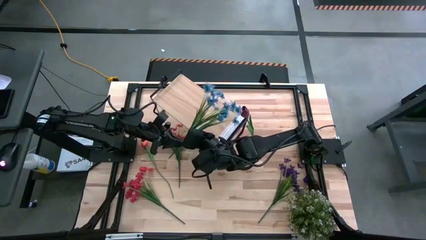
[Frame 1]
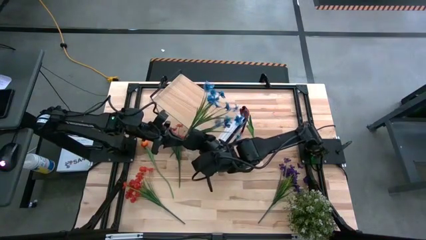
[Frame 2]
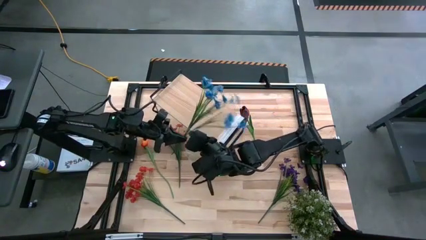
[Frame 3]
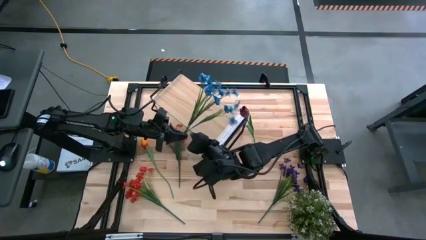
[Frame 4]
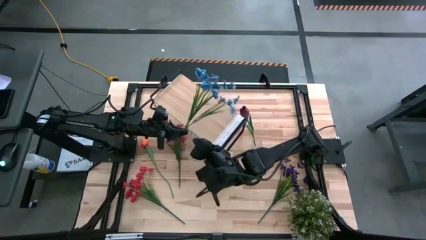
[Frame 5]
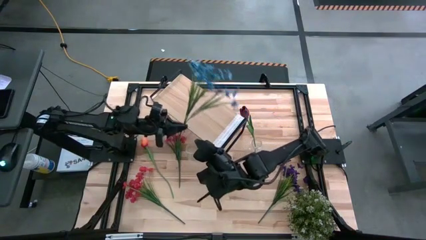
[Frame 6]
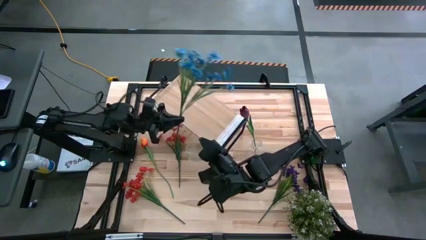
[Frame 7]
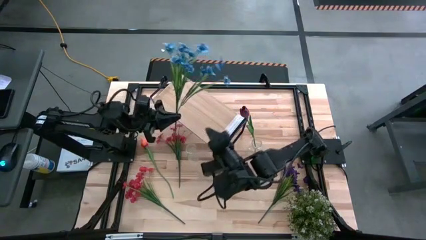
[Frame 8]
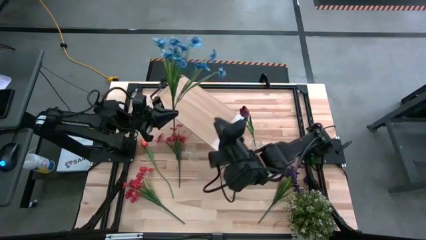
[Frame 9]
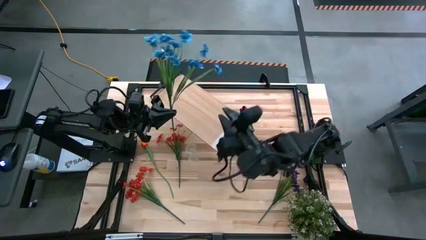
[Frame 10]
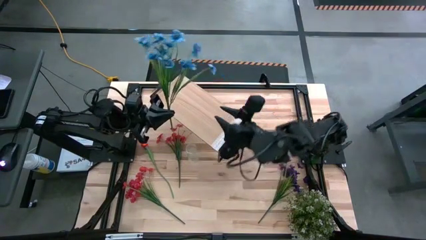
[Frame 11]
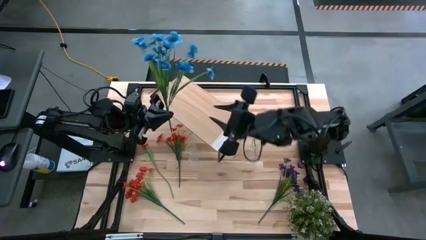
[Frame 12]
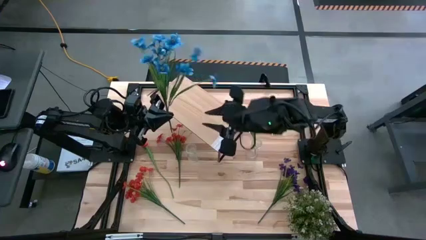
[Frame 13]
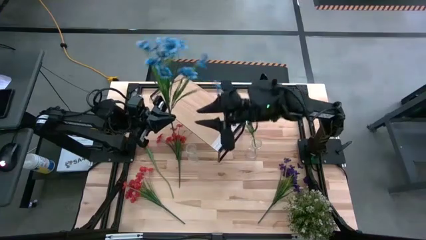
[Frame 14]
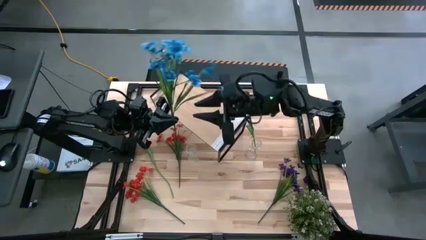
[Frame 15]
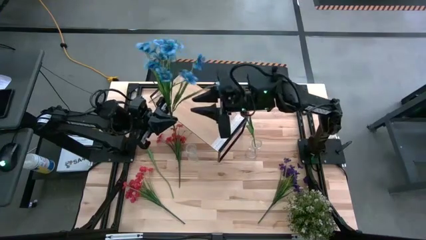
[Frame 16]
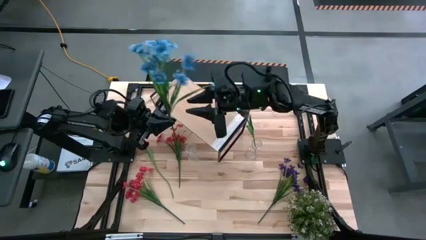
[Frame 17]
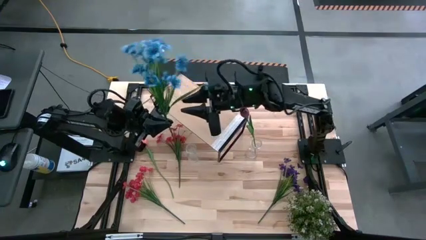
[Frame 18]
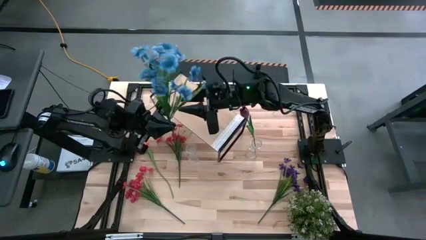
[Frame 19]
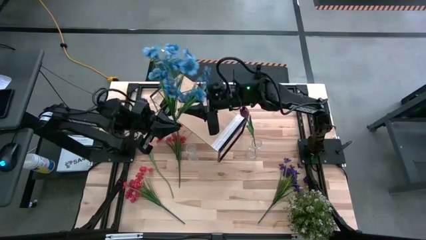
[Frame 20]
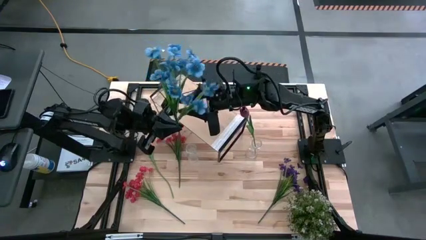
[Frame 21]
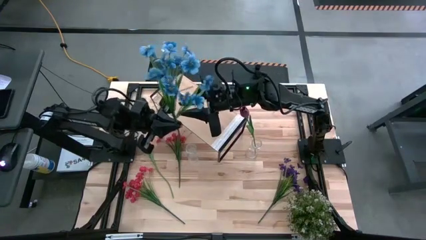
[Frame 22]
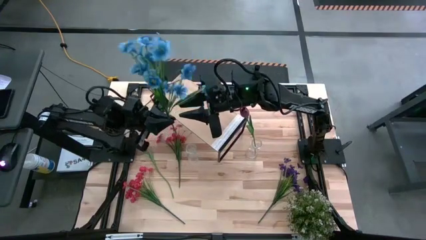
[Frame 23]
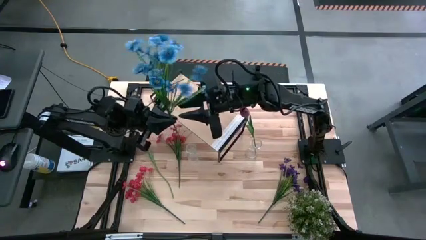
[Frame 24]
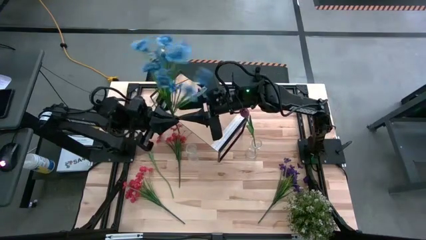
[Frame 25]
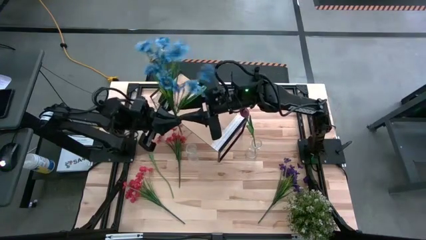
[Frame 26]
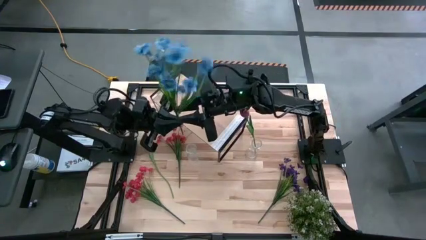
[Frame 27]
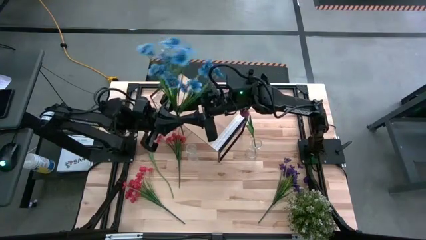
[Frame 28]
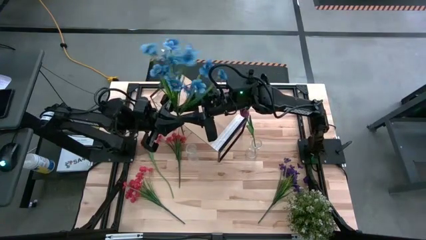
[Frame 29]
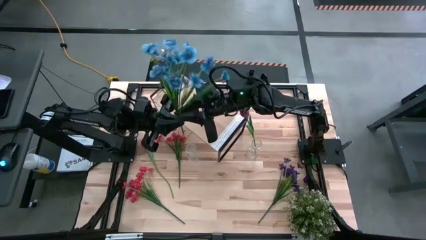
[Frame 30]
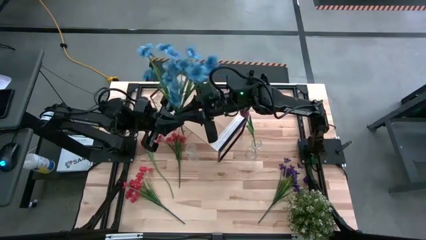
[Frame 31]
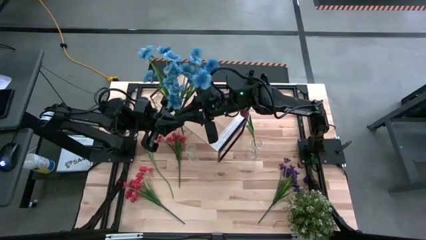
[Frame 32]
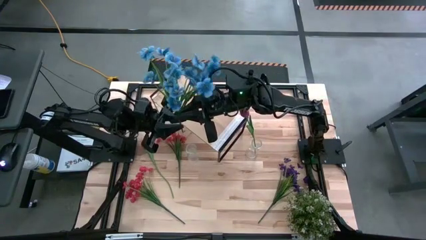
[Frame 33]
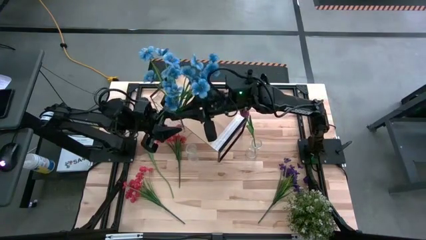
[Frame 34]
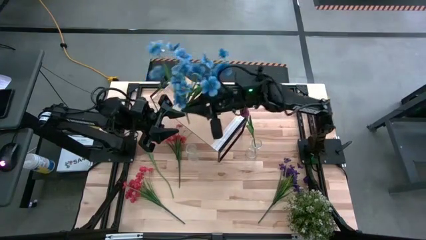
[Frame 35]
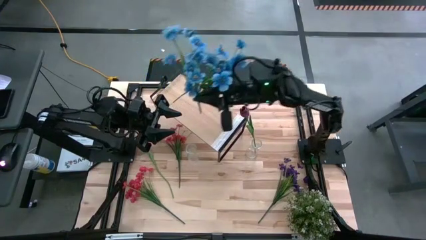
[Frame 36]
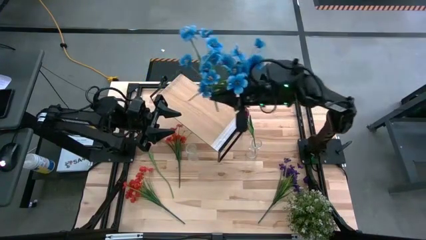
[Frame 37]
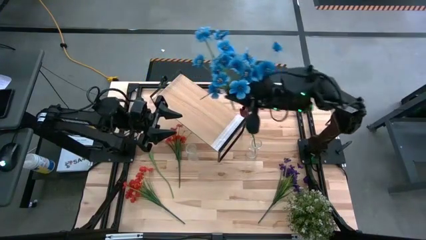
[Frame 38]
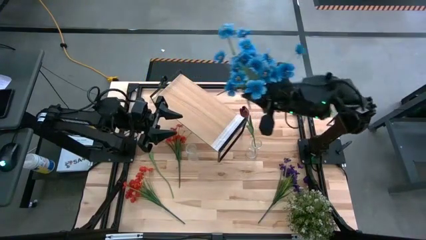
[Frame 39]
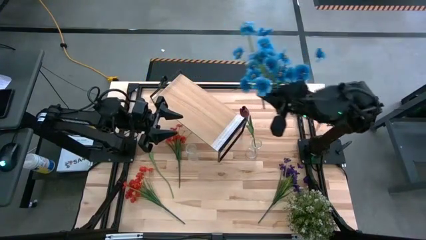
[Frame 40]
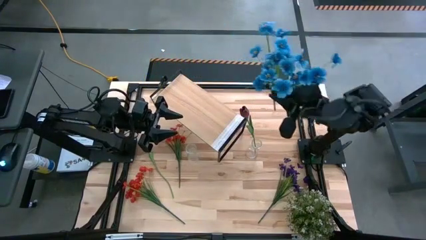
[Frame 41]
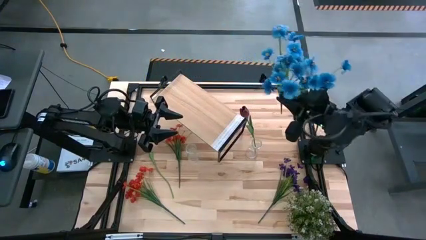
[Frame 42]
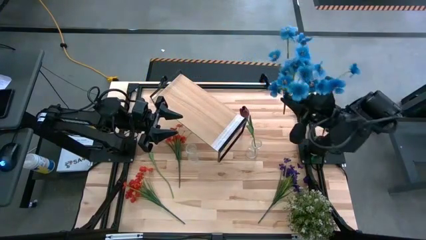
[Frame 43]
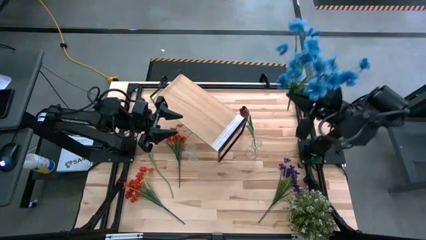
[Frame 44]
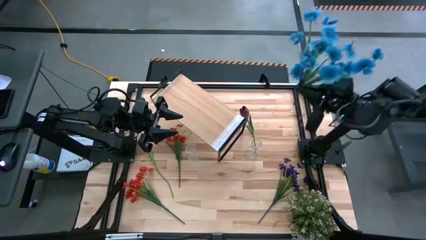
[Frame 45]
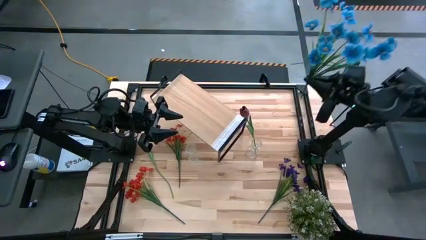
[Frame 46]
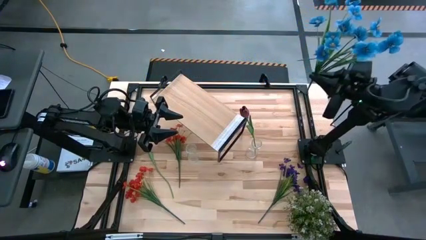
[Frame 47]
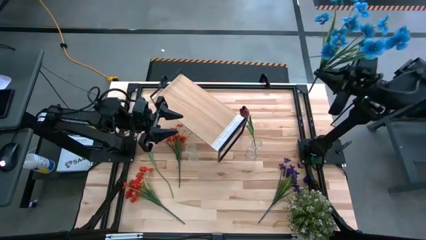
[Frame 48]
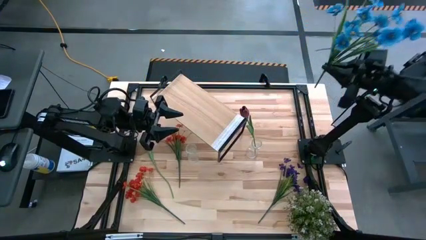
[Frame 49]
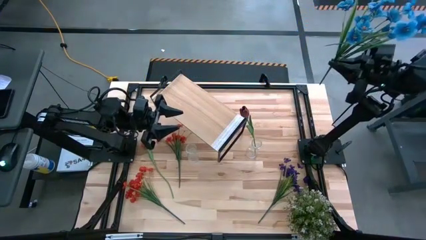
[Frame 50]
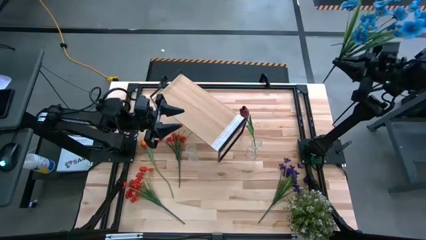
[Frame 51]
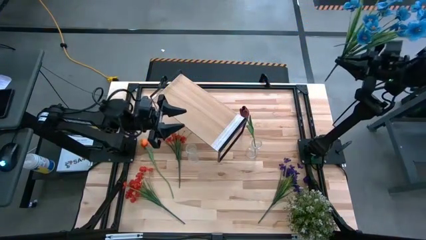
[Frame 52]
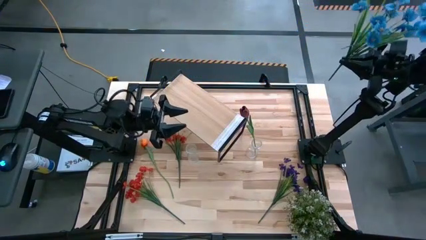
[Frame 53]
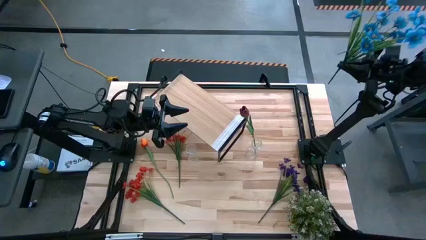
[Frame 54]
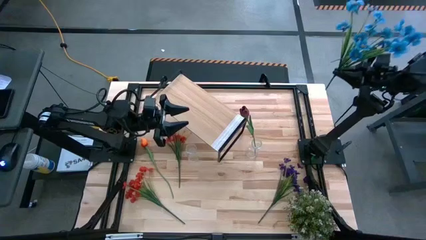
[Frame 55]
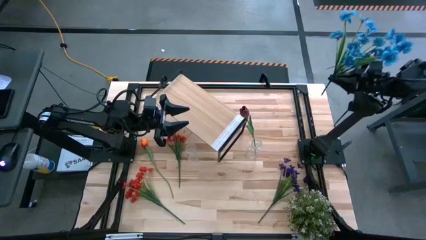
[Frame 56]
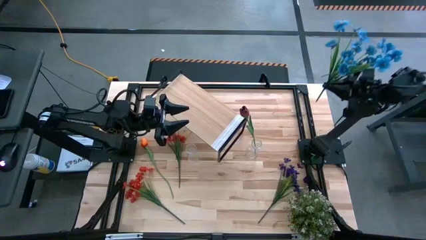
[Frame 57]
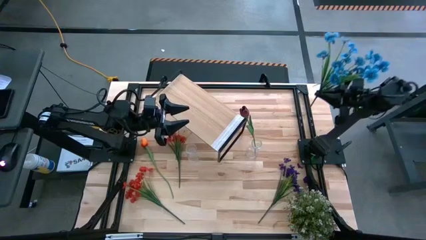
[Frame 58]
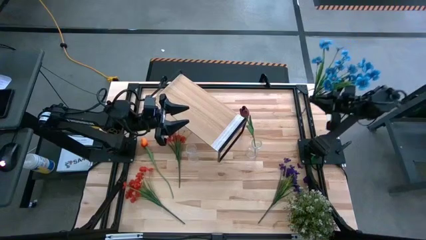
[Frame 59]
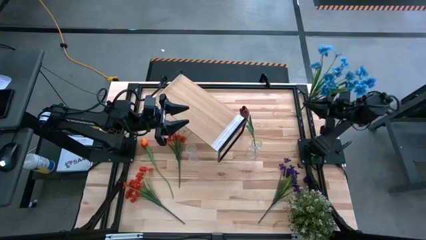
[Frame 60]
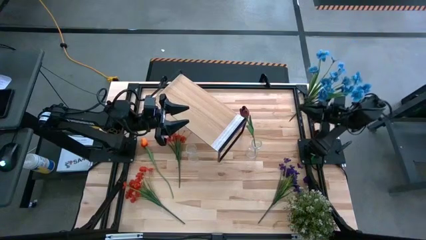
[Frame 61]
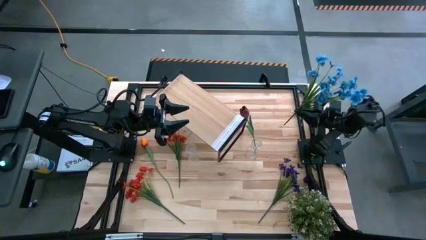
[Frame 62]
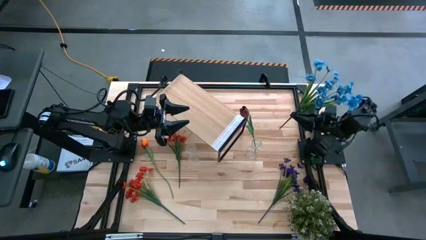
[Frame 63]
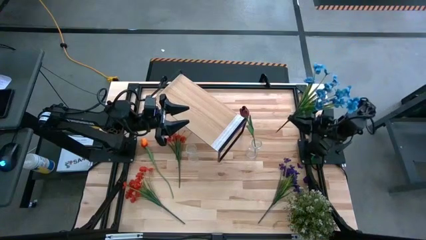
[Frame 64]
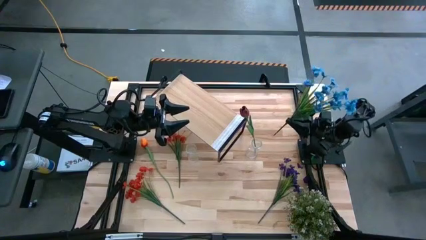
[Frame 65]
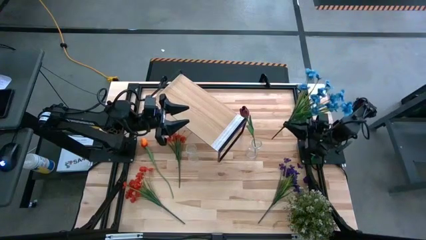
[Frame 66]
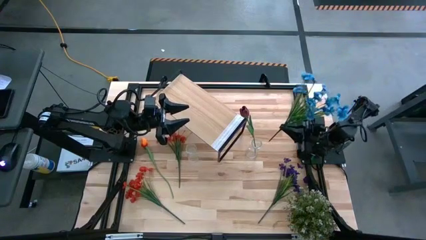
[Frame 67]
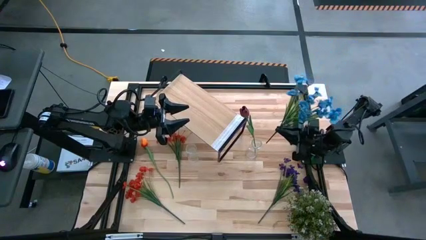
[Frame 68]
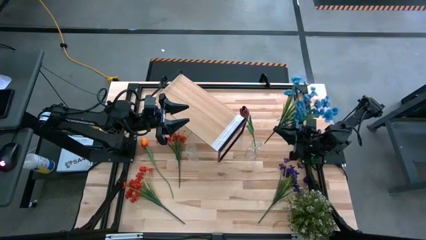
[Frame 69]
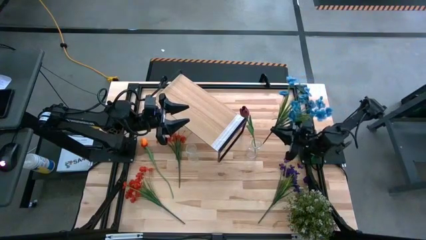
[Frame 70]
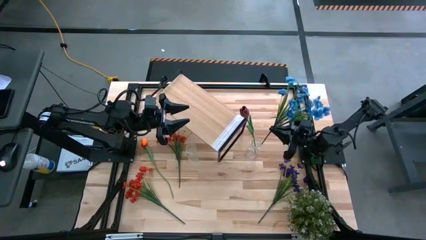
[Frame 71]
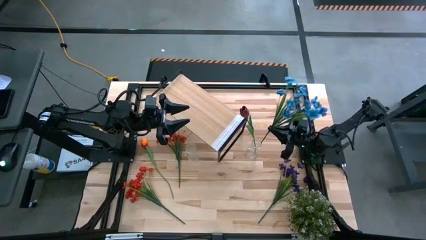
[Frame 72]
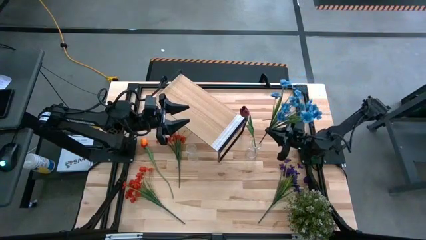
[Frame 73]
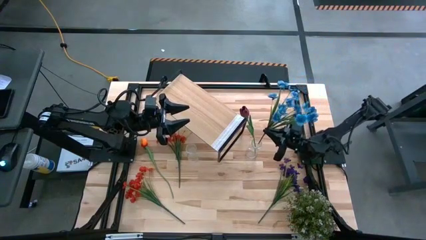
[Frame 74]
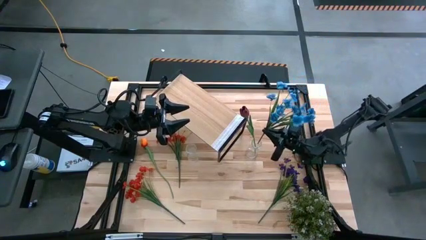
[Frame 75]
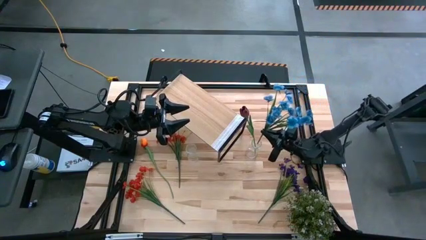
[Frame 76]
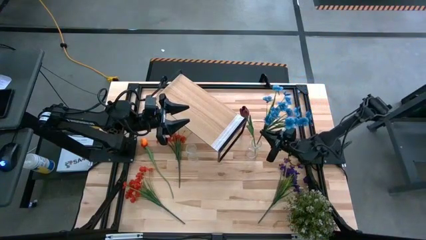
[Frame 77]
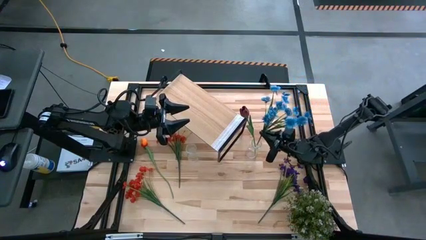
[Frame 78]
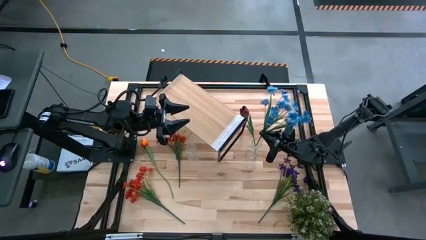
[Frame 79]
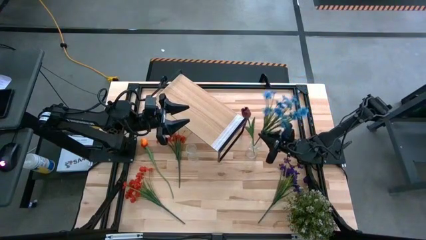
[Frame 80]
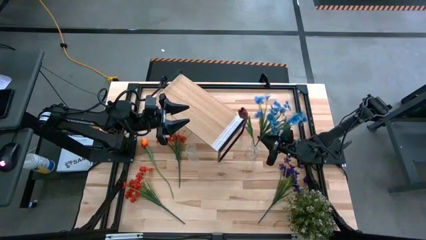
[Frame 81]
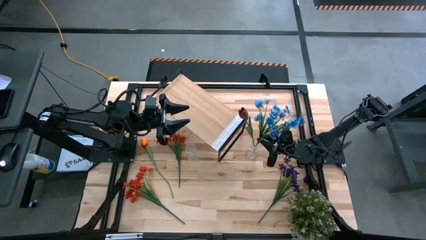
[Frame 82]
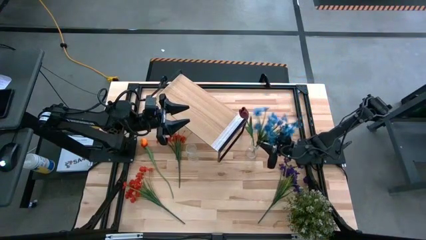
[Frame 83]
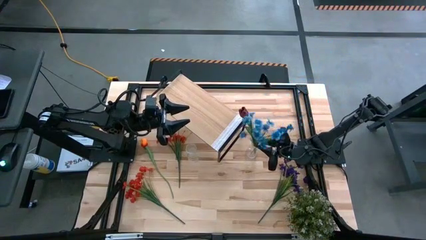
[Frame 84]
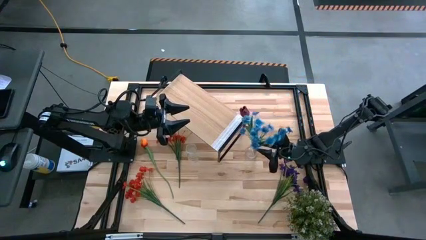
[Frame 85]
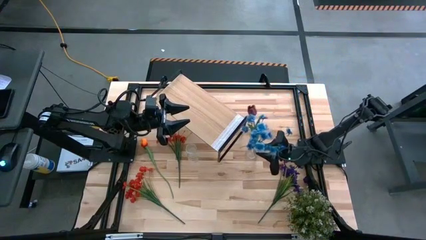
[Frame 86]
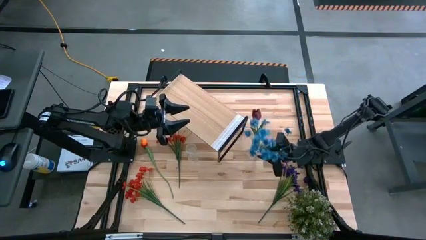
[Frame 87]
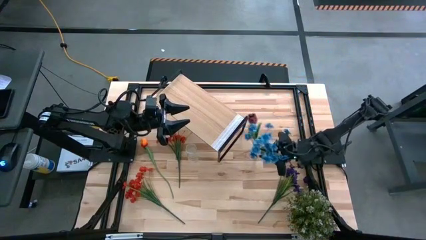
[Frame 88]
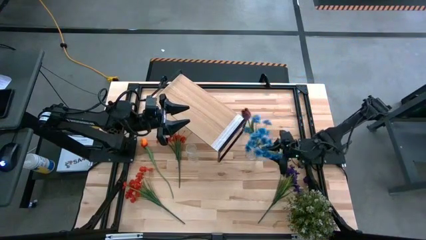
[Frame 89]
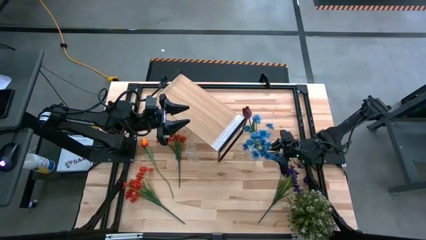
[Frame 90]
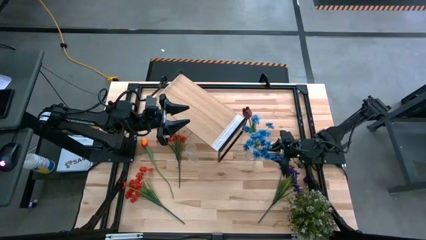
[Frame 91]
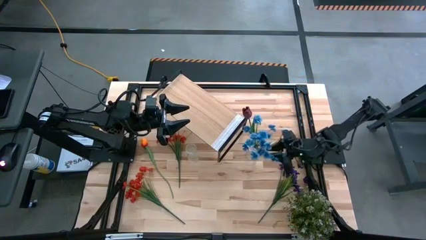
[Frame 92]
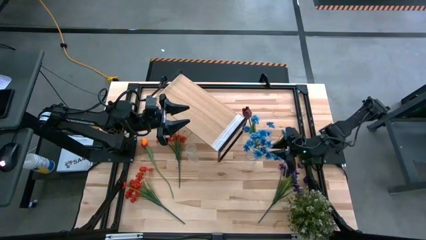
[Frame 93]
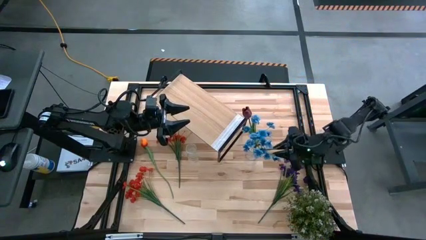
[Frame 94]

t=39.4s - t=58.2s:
Task: Pick and place flowers into a vace then onto a shelf
Put the blue flowers into the right transparent flower vase
